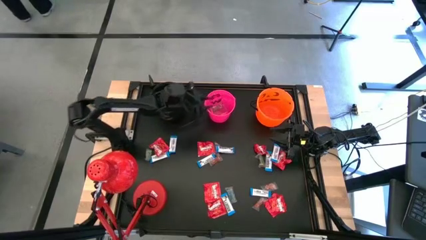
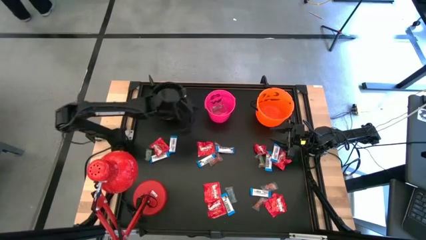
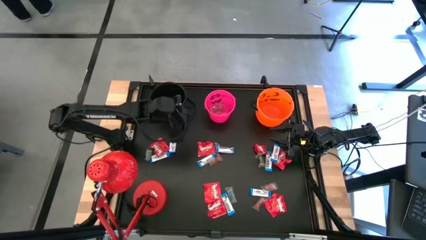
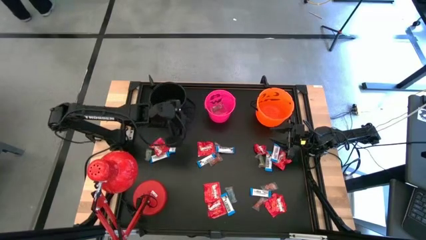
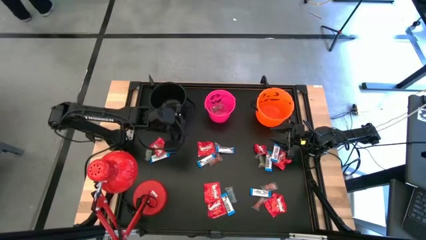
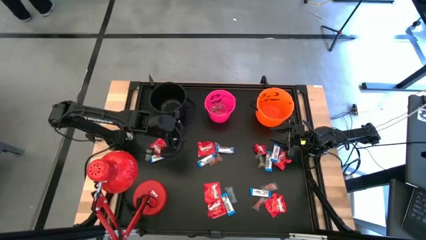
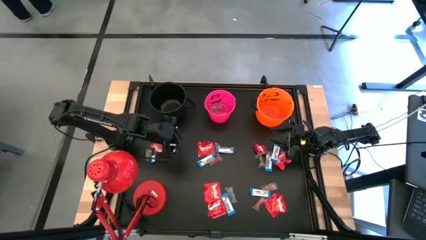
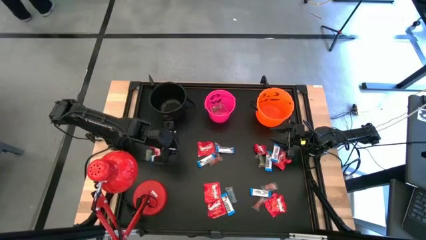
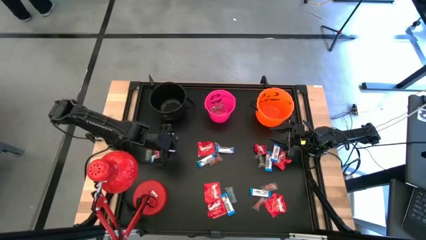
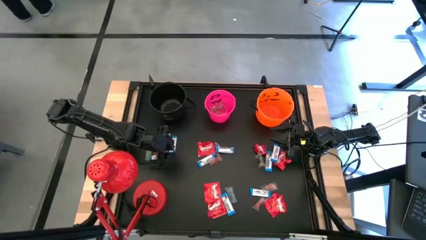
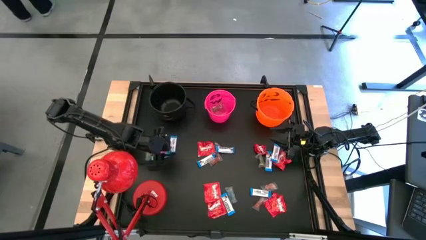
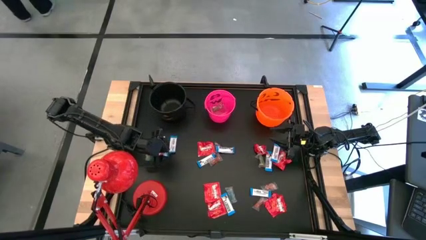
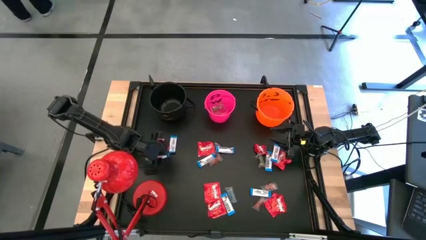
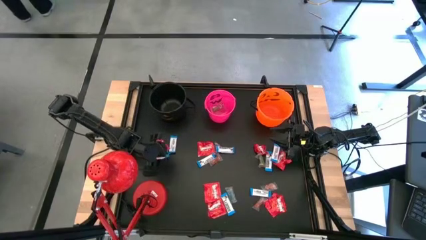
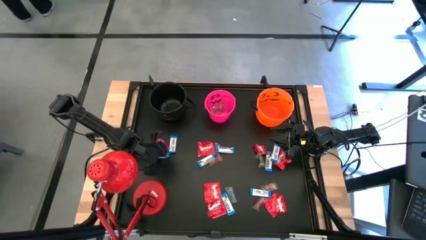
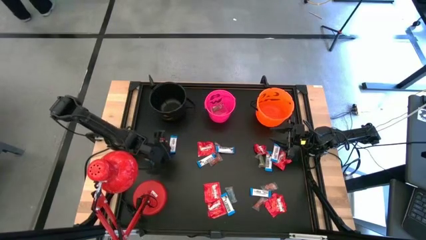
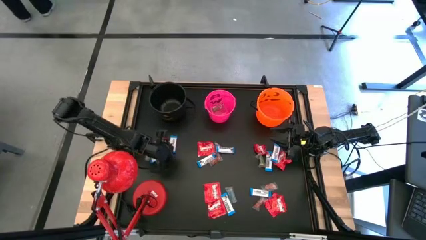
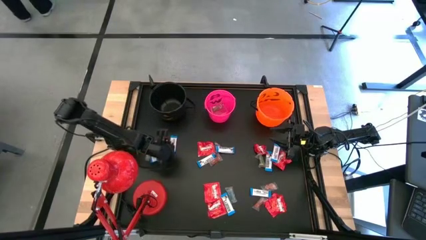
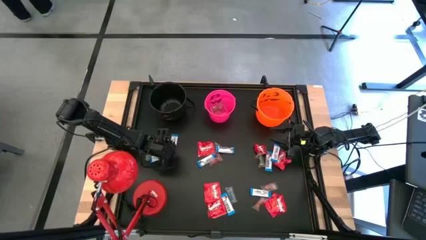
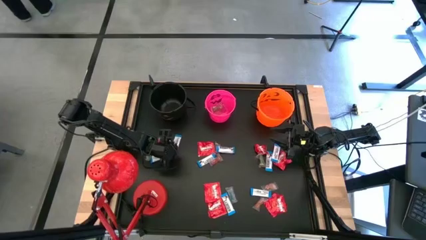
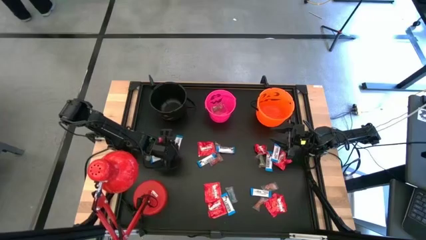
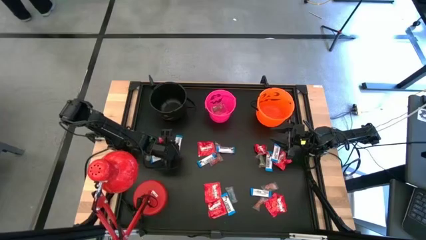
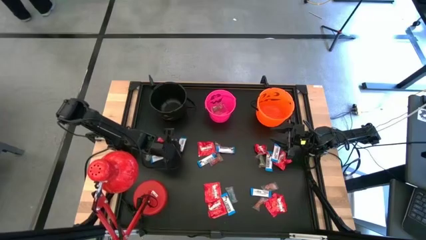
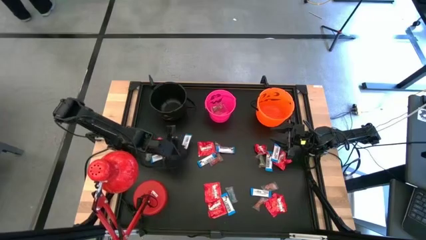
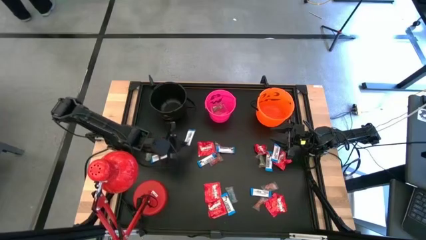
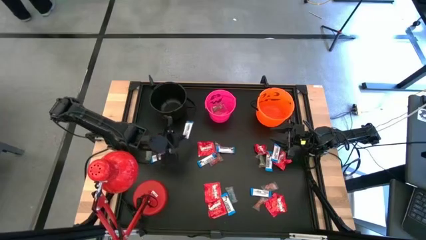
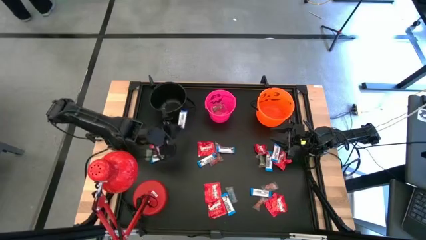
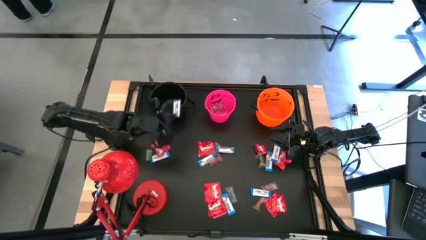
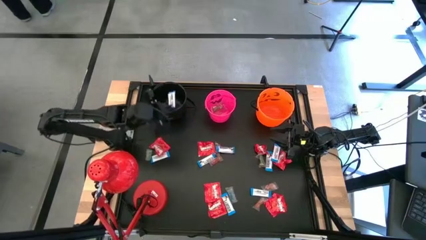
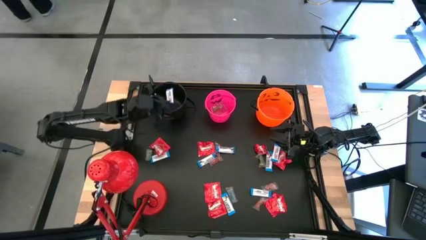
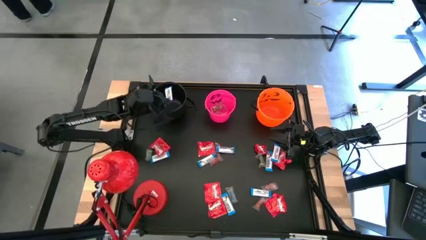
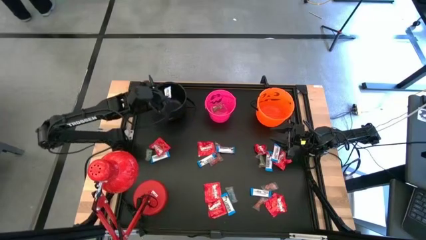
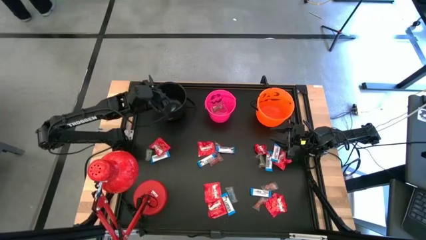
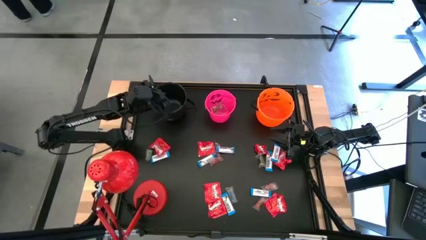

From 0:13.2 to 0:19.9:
Task: Organize candy in baskets
Put the white chocolate bar into the black bucket

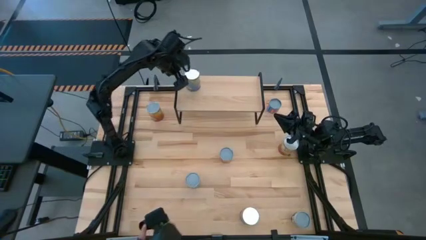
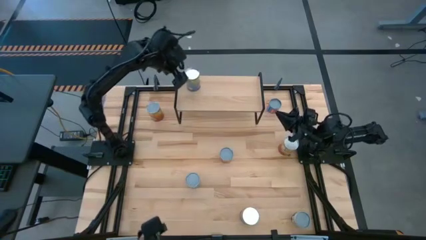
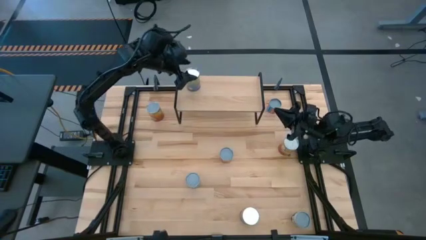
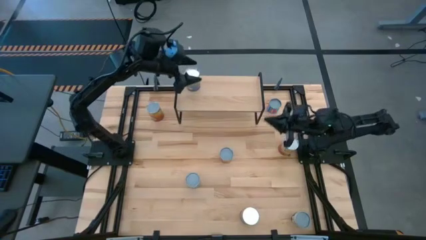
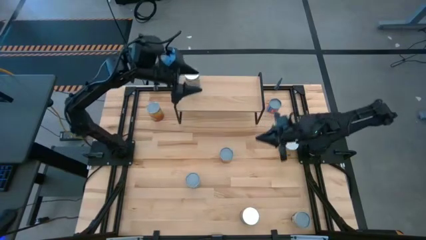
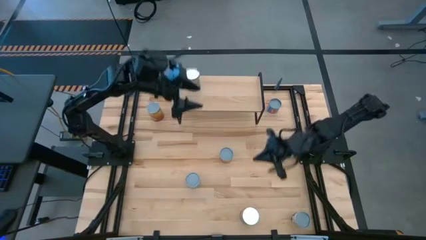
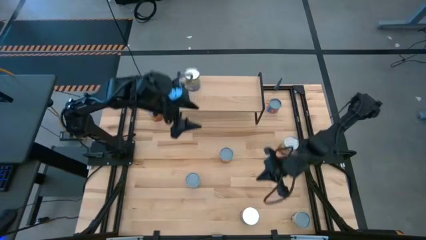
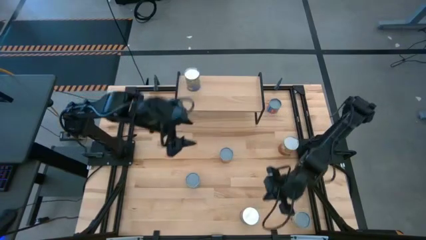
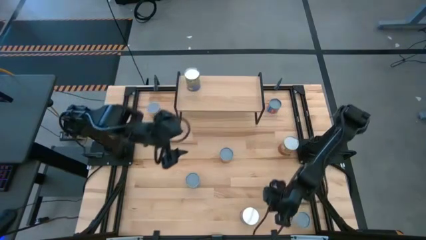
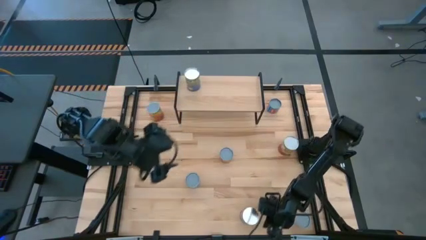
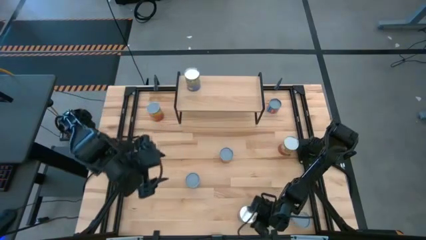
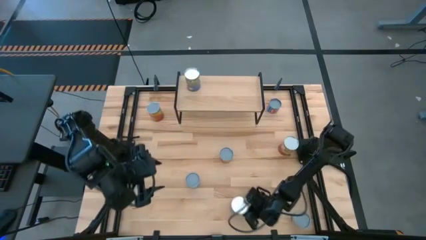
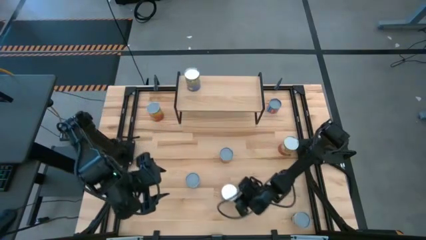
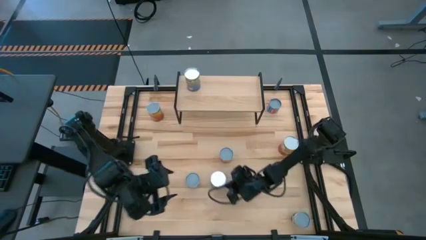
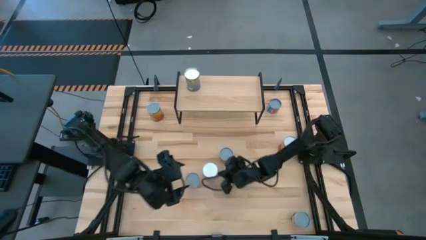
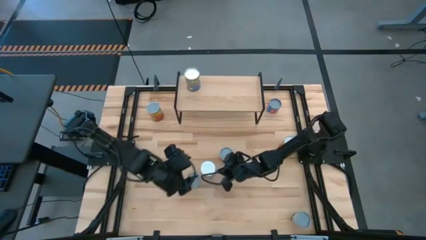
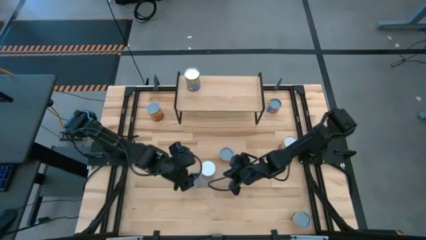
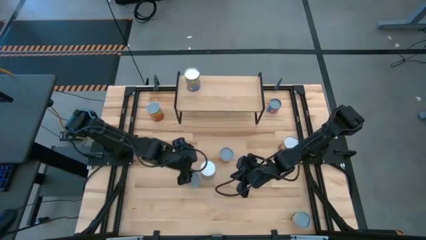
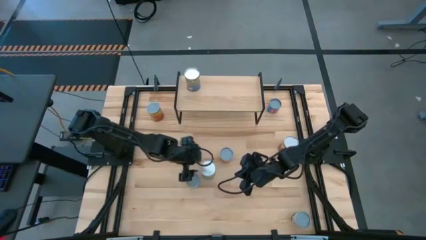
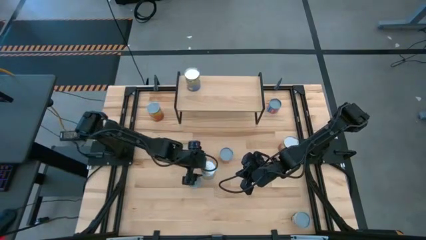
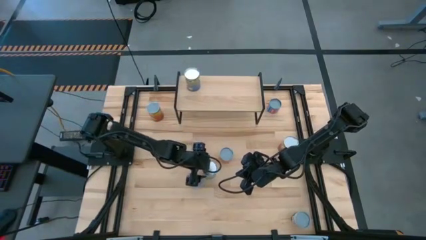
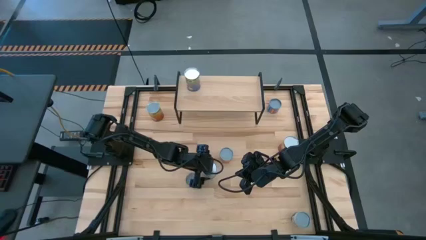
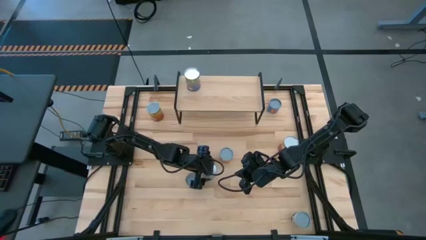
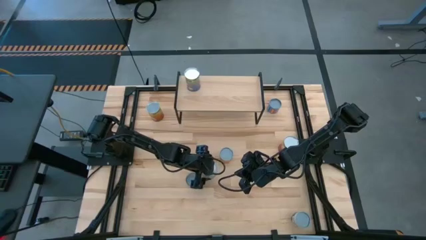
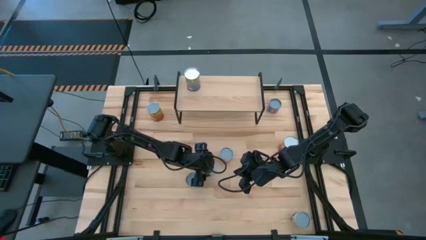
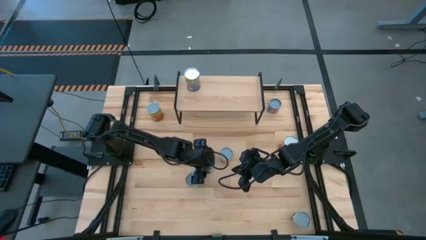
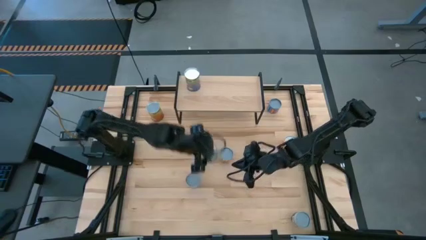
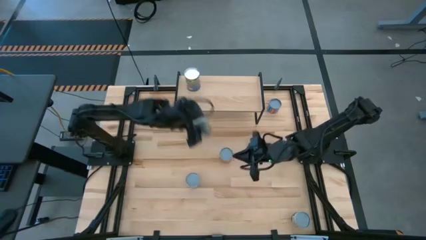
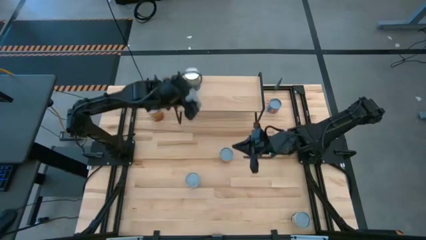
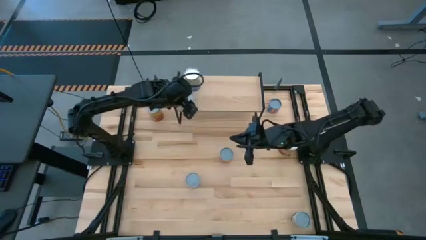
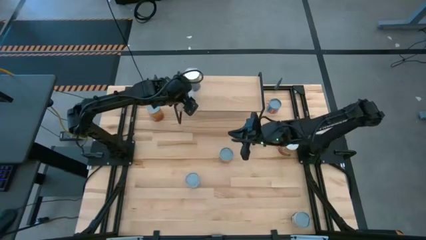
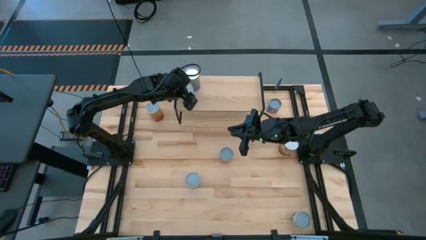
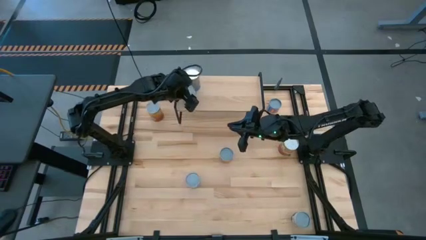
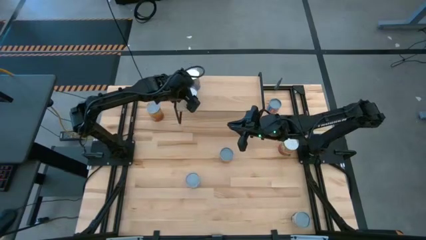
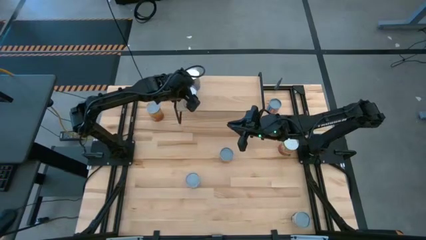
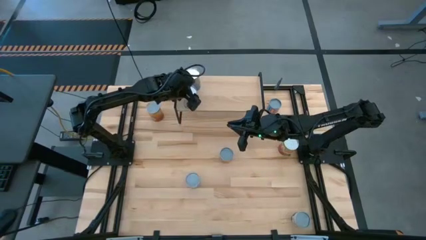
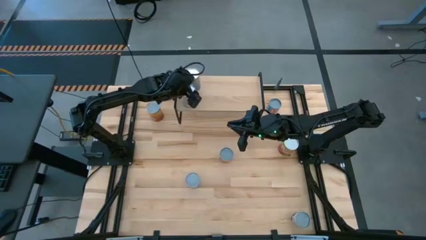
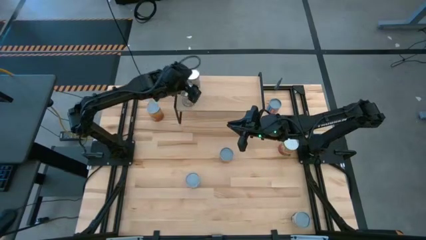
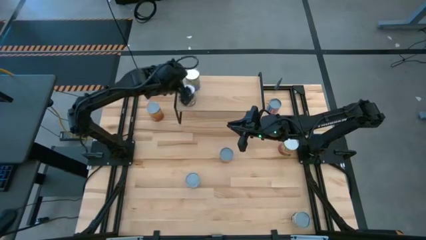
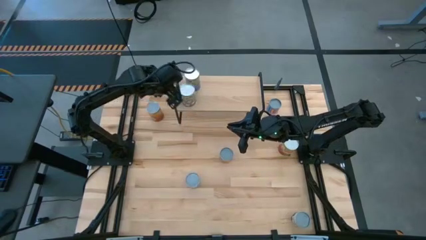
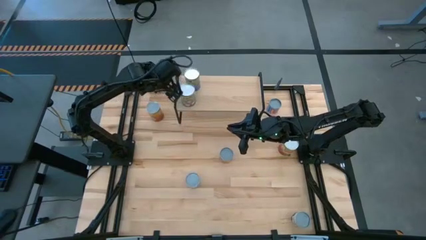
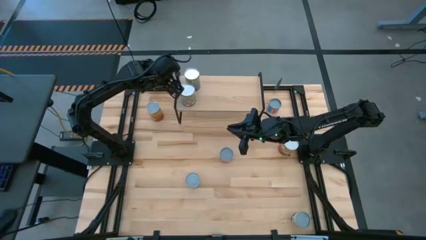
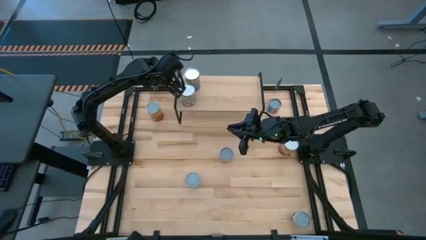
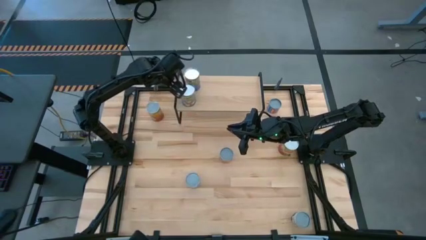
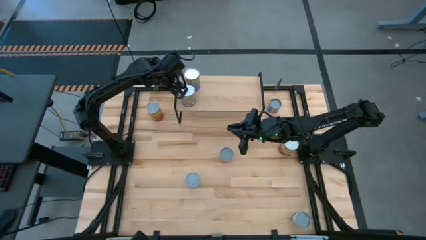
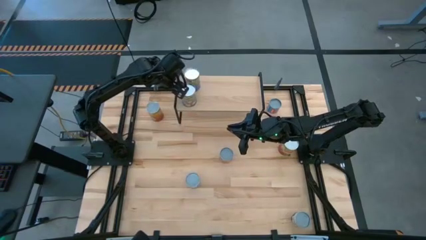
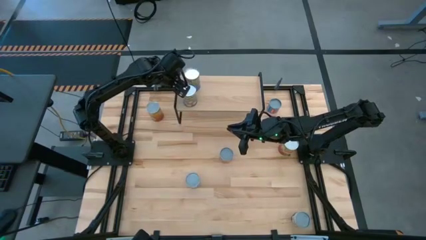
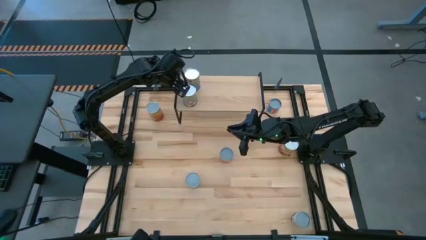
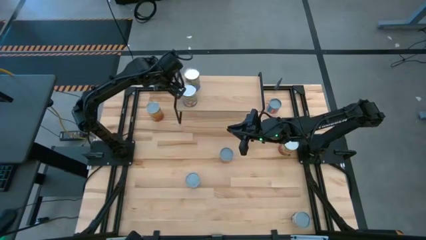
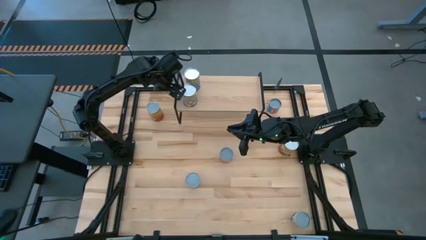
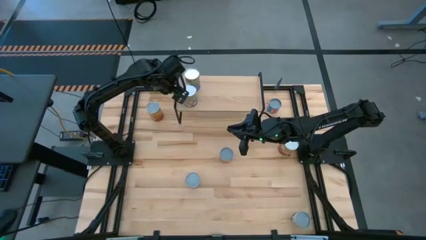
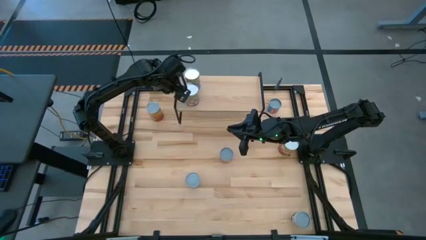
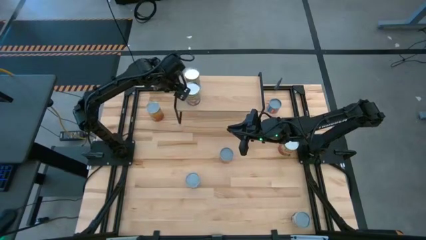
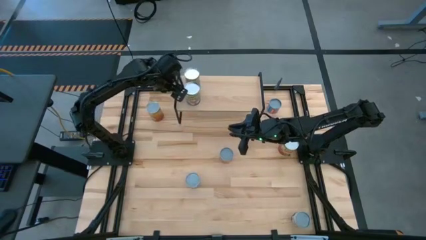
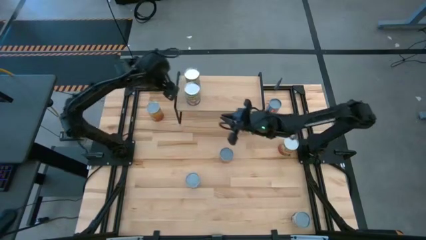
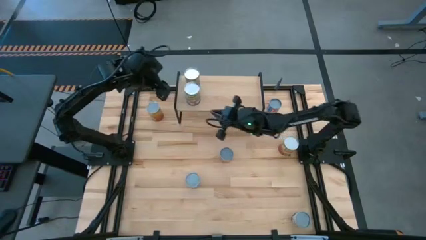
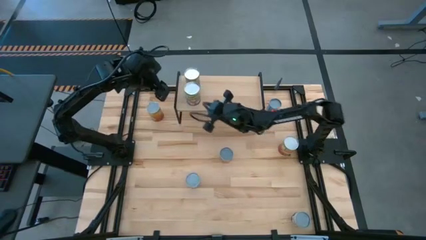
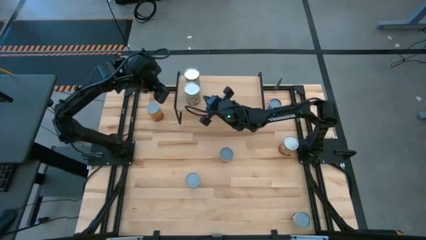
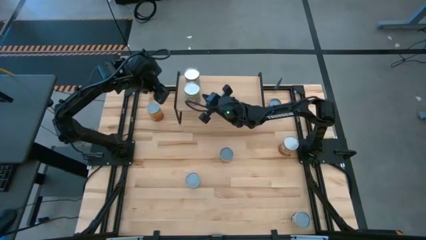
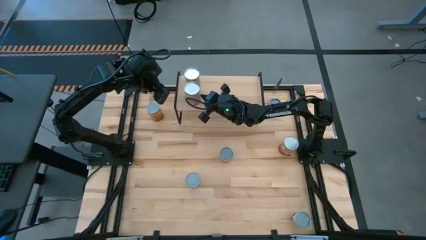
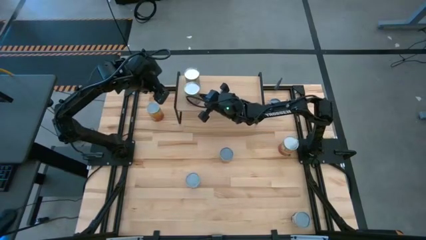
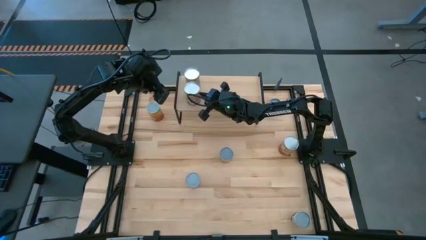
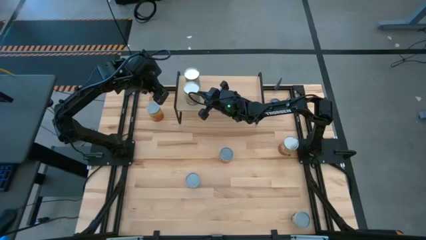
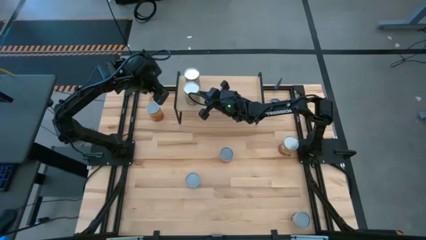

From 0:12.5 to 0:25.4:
Task: Pick and place cans onto a shelf
Put the canned peaches on the shelf aligned with the other canned peaches
